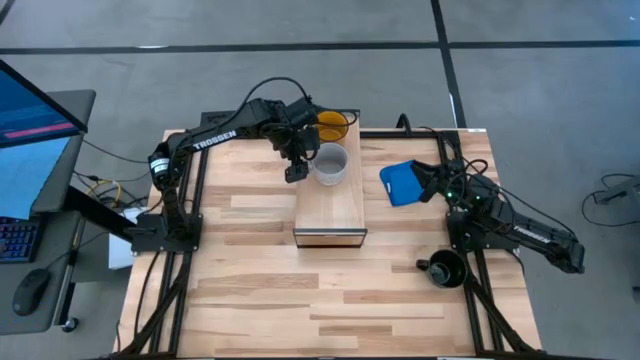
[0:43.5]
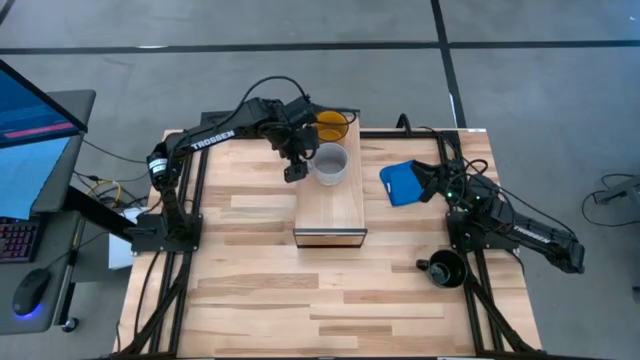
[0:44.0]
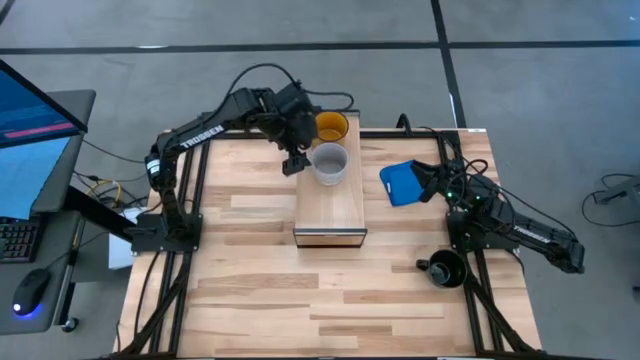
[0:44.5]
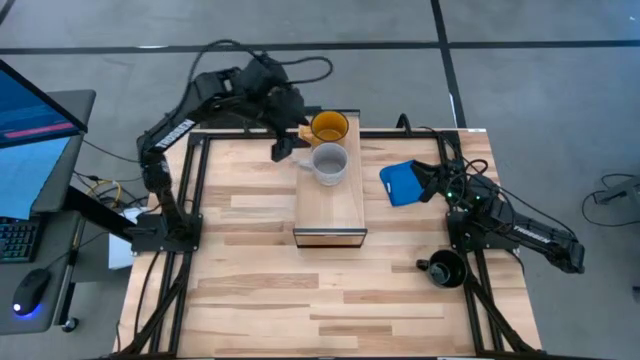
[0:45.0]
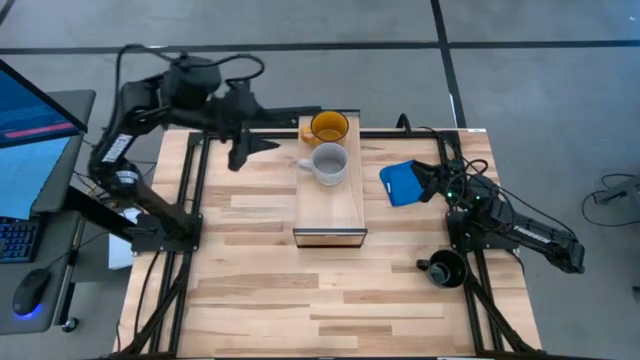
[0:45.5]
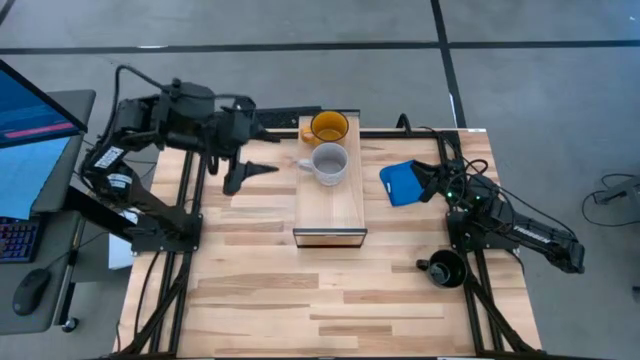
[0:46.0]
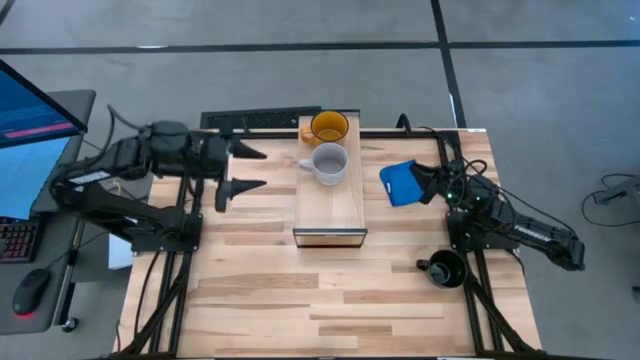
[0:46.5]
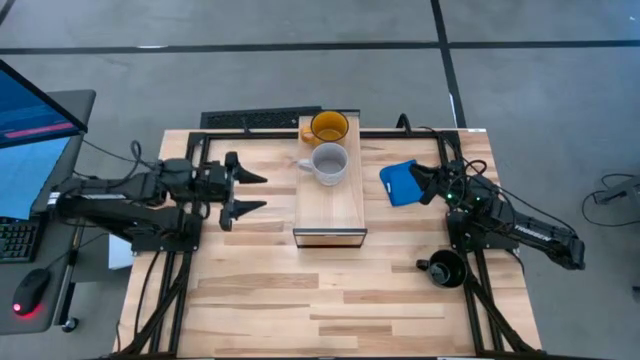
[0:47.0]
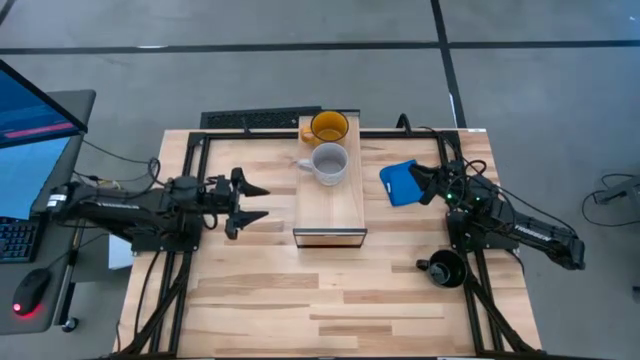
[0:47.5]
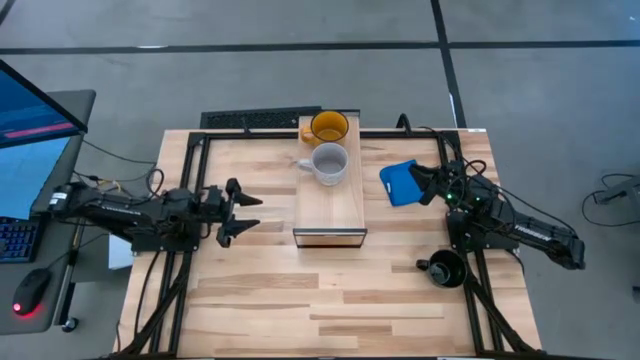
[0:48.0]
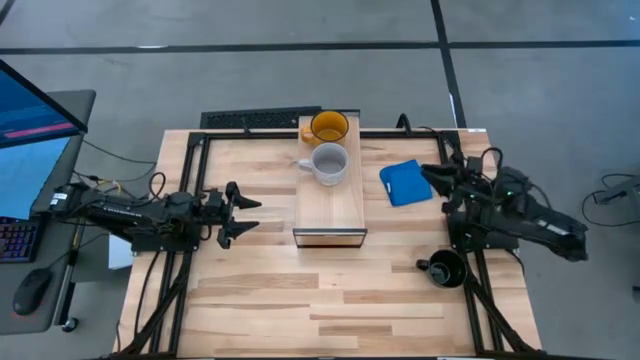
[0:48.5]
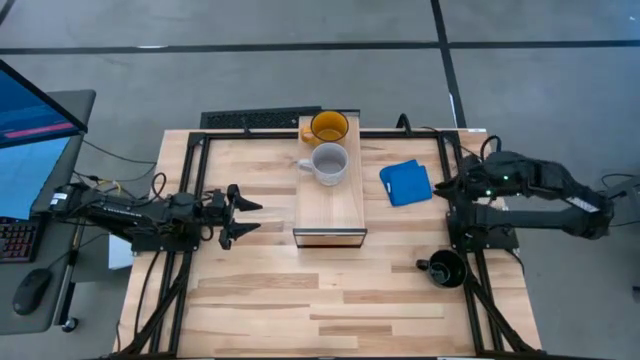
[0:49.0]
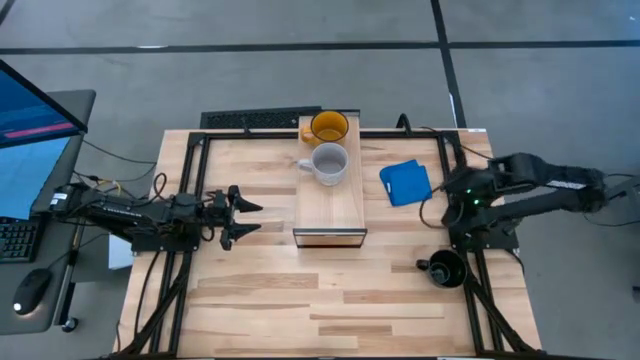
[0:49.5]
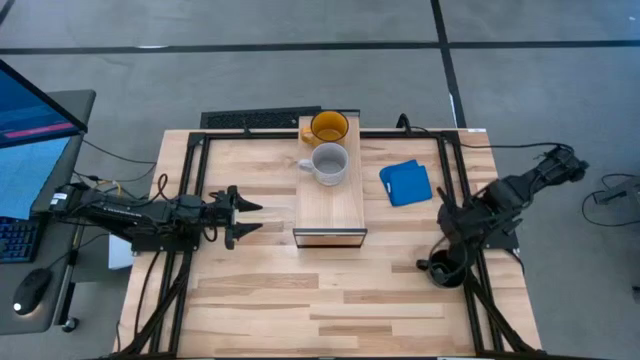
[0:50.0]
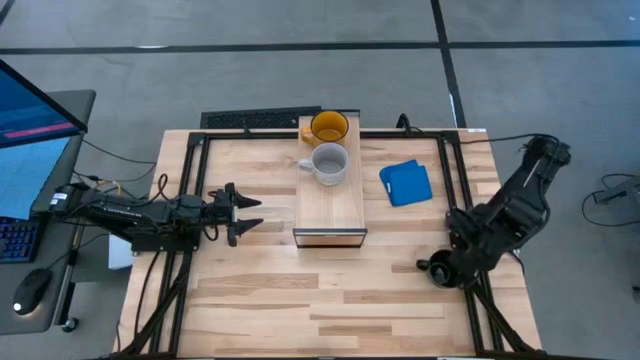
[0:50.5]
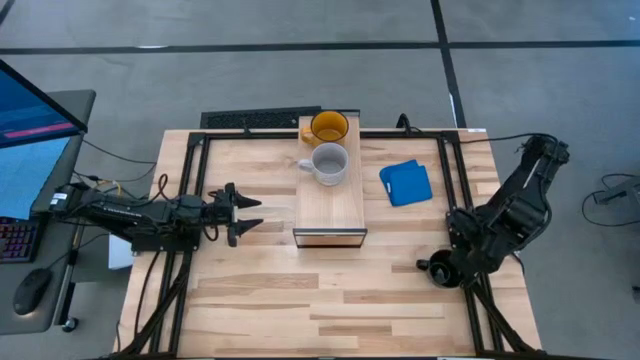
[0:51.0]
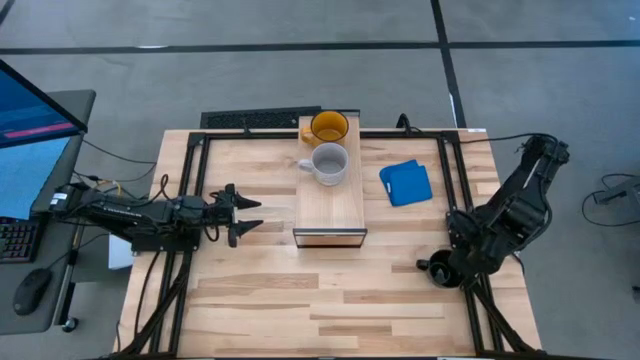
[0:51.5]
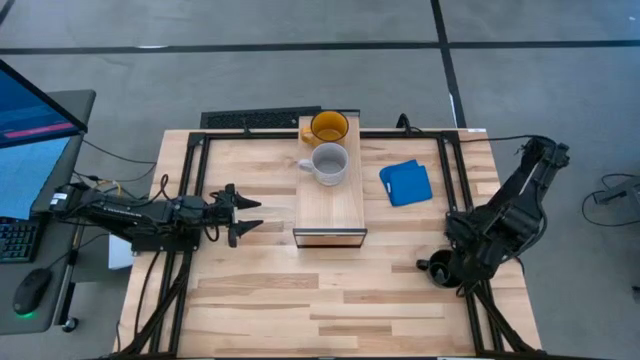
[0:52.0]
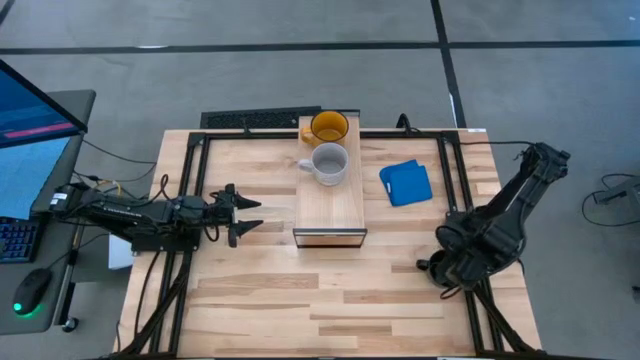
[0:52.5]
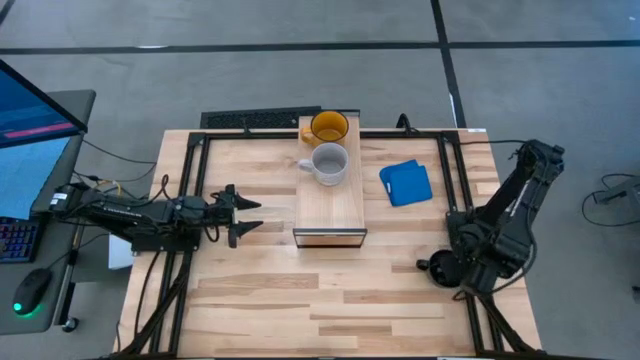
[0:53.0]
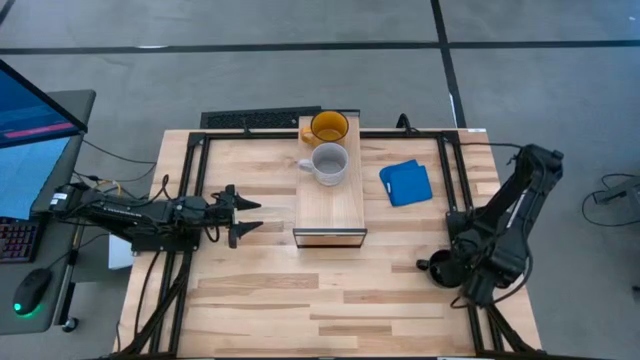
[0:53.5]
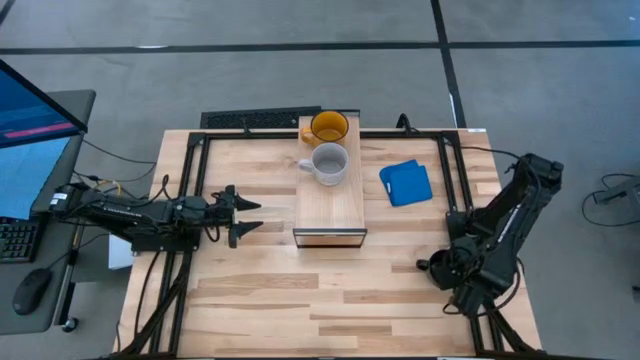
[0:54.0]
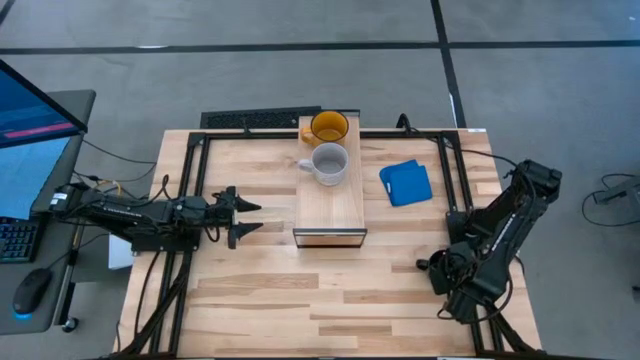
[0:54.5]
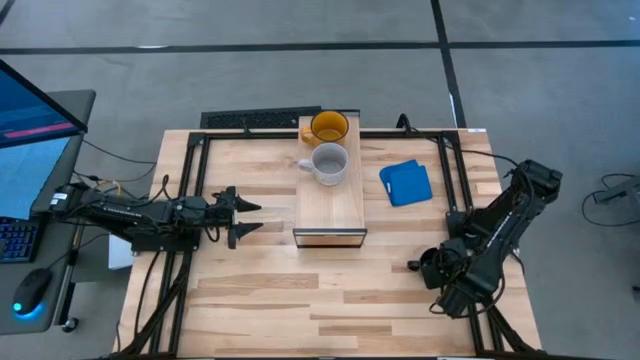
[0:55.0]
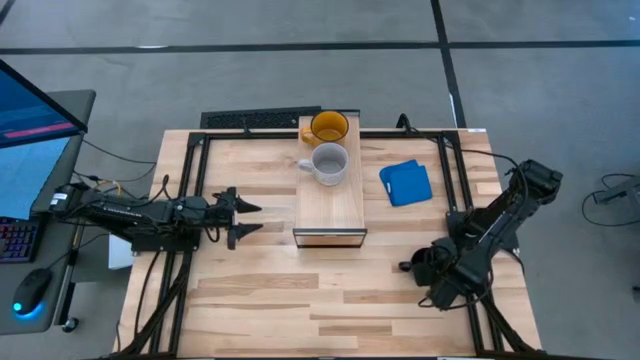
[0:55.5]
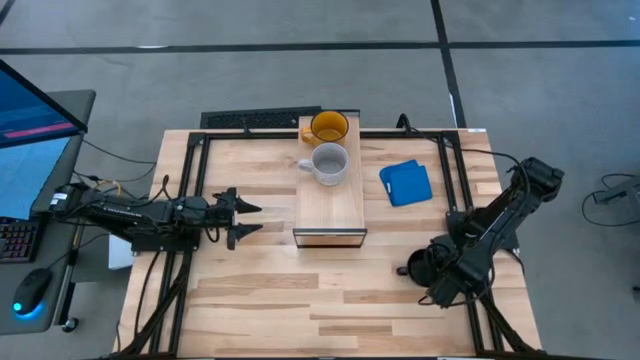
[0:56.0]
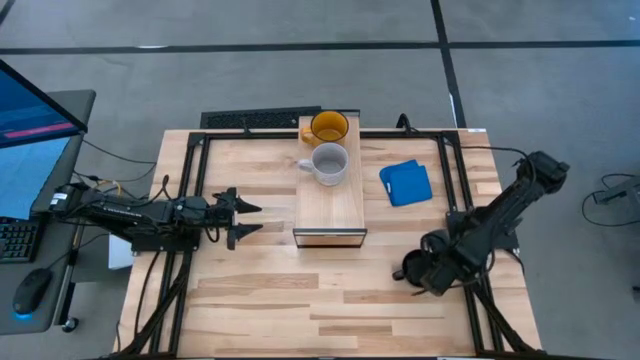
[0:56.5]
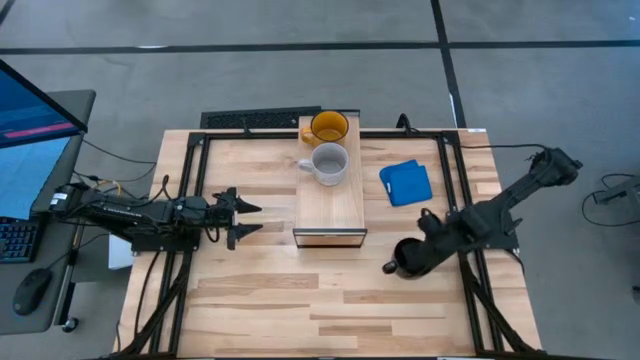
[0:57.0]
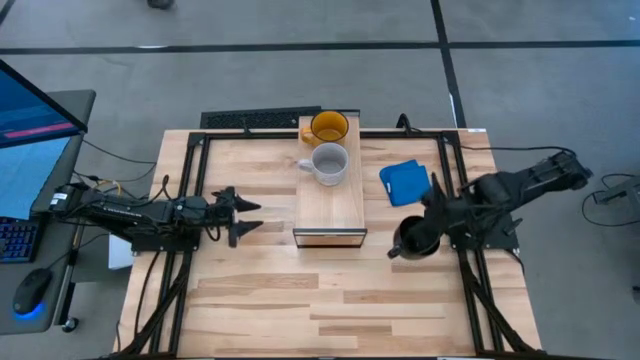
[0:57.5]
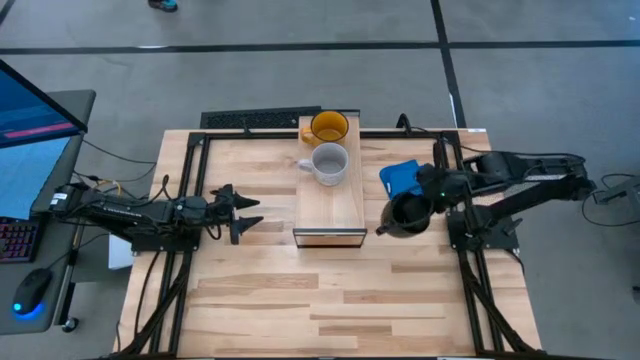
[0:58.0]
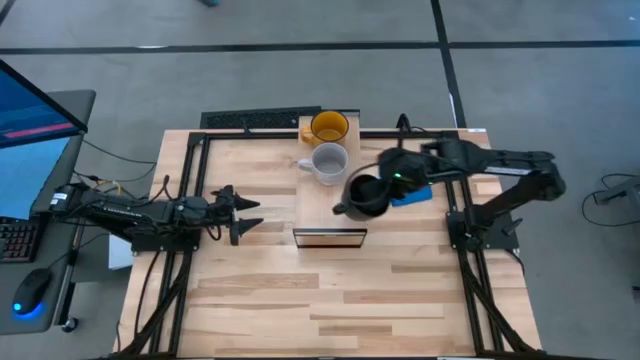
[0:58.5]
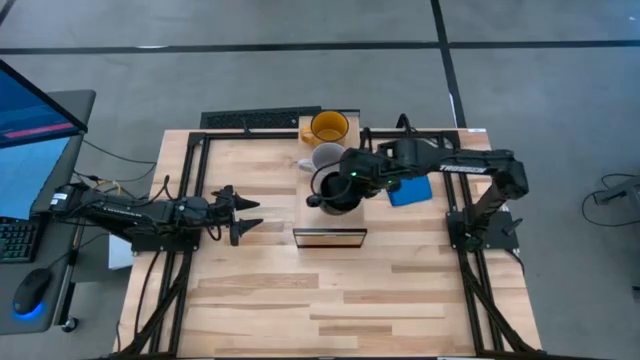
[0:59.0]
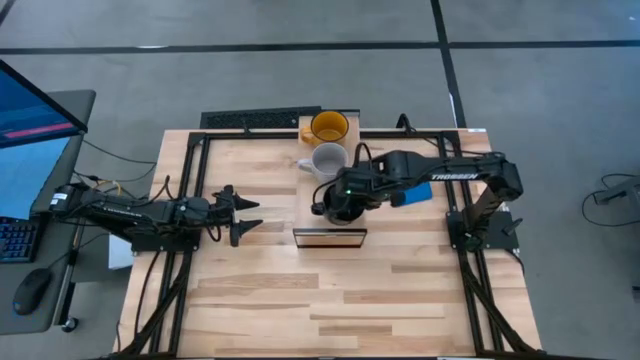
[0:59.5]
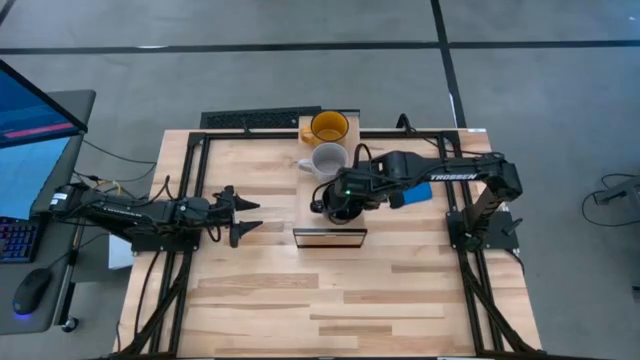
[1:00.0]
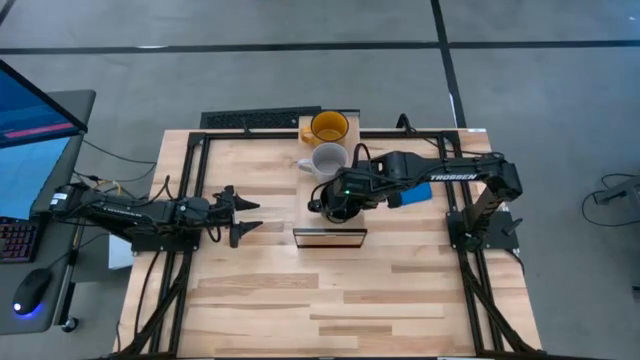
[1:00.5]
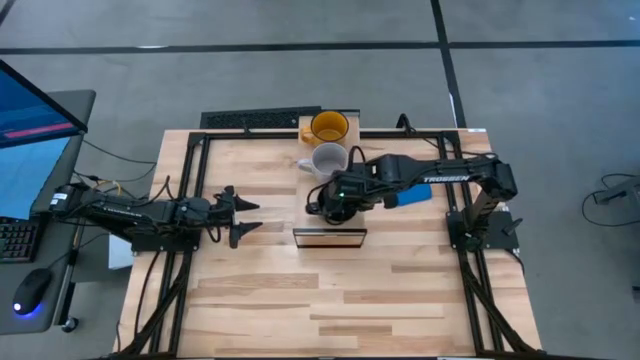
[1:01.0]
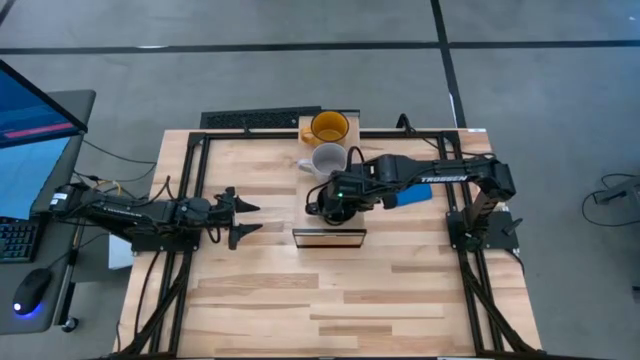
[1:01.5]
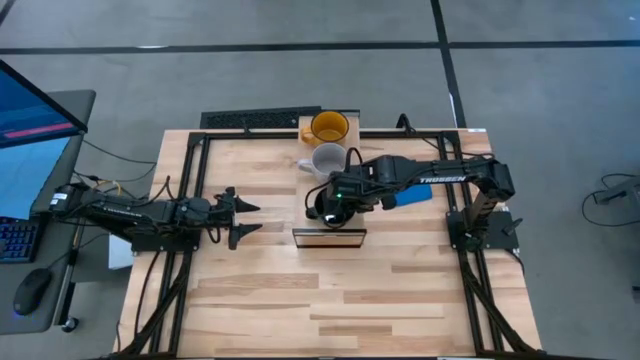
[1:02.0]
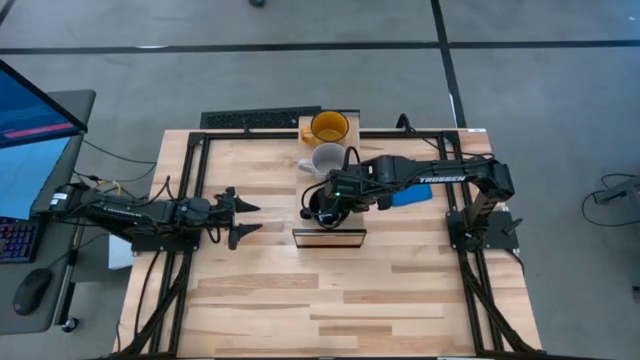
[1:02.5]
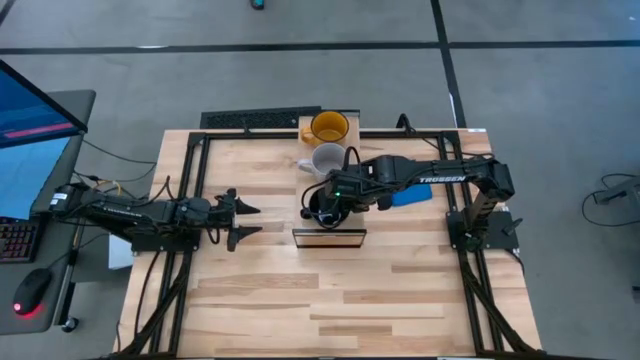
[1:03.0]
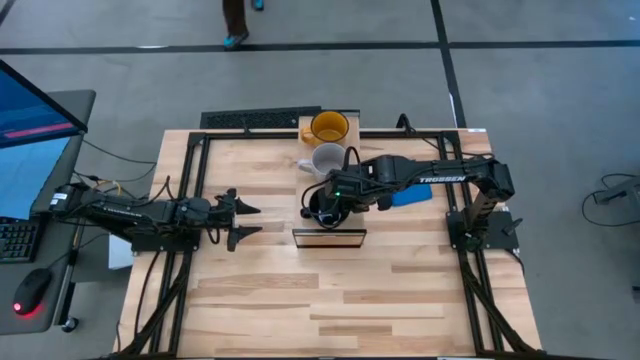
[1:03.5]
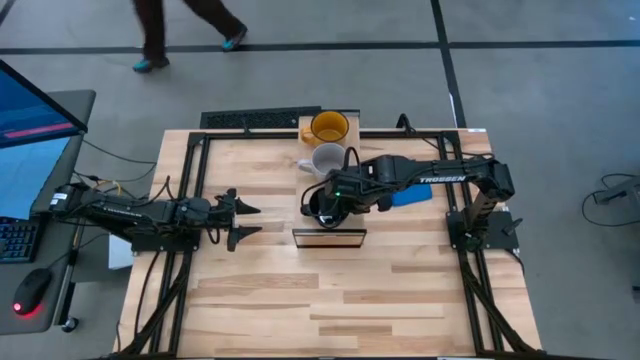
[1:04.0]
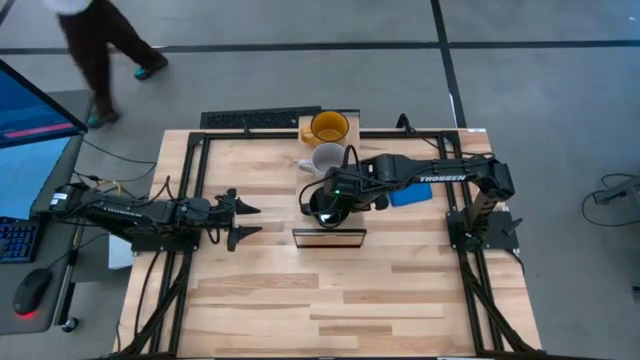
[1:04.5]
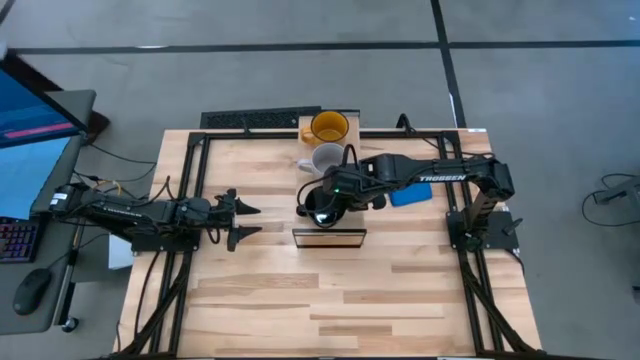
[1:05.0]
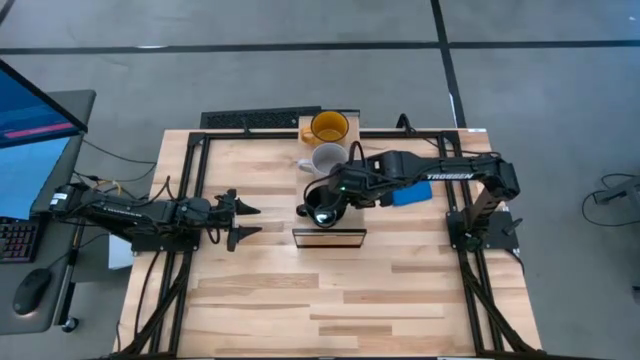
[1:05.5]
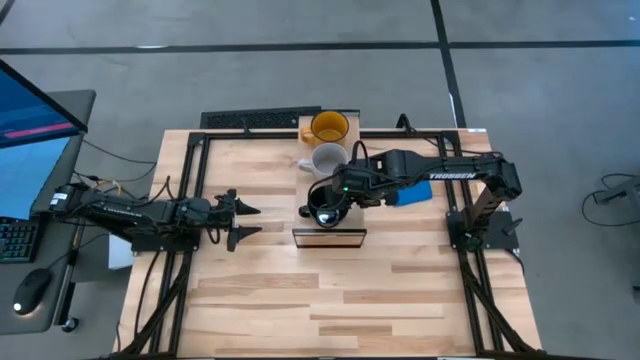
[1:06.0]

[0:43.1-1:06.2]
Task: Stack small to large cups/mugs on shelf
Put the black mug on the shelf
